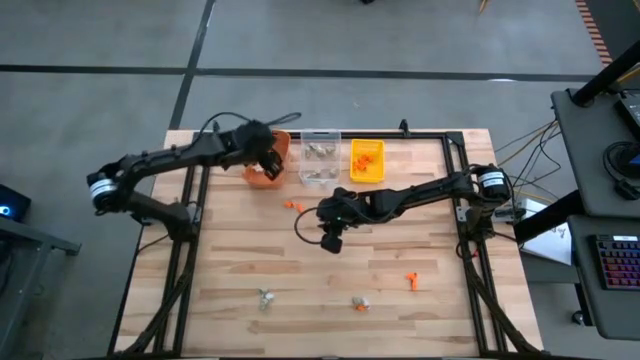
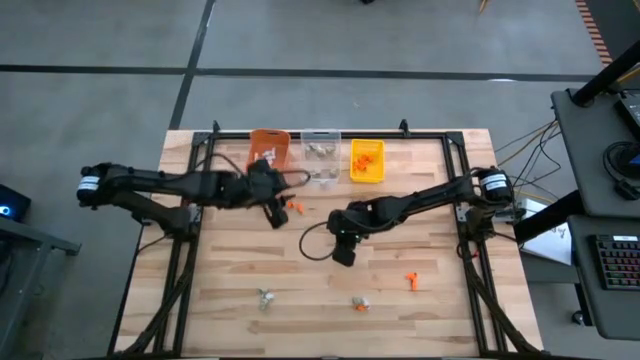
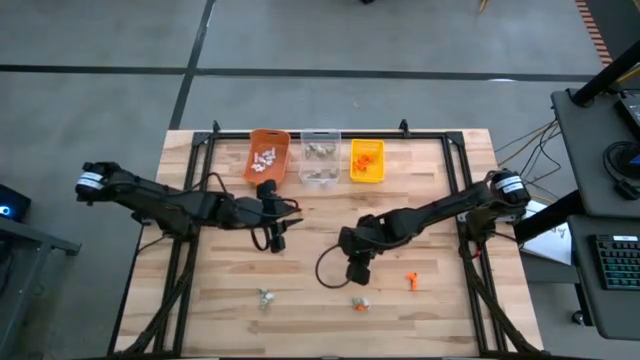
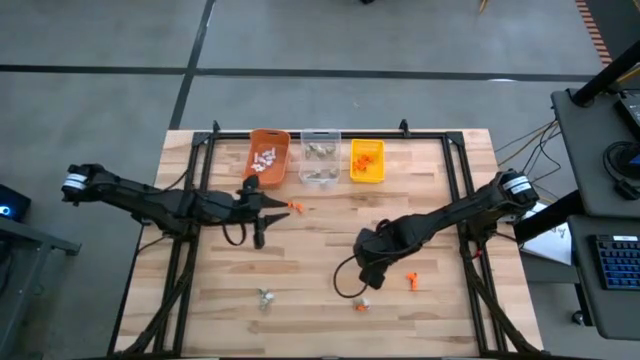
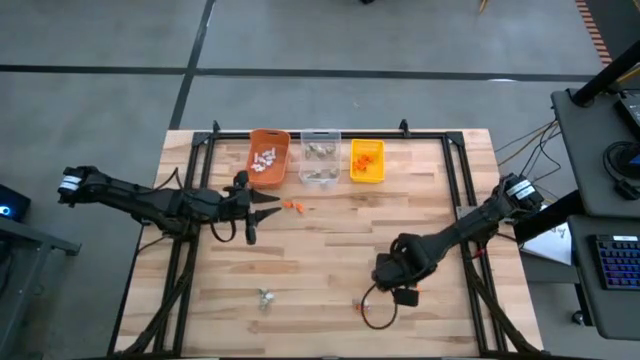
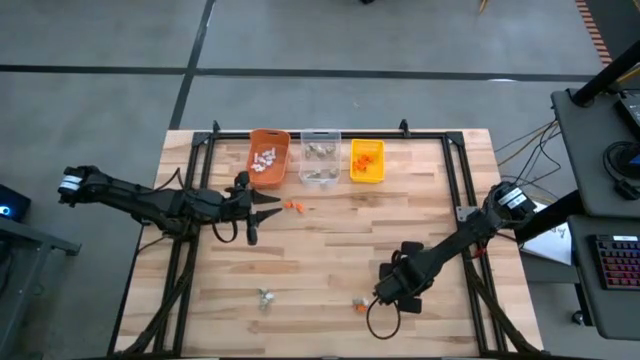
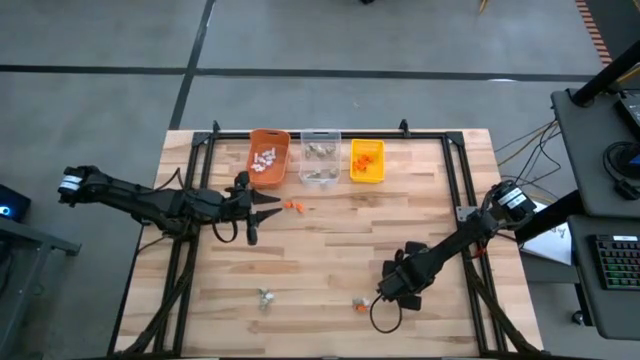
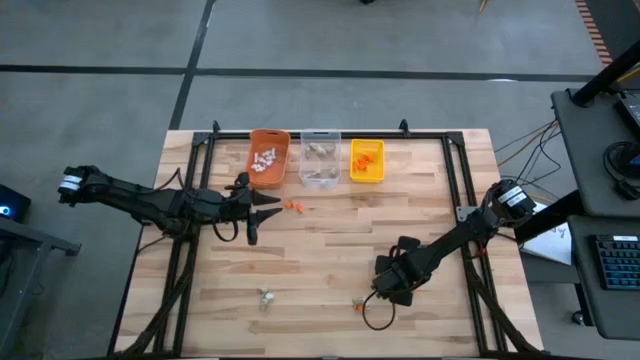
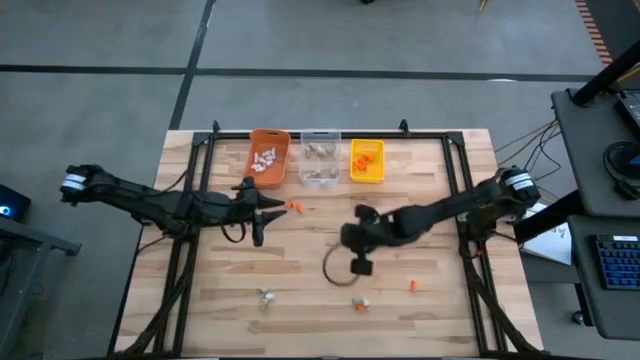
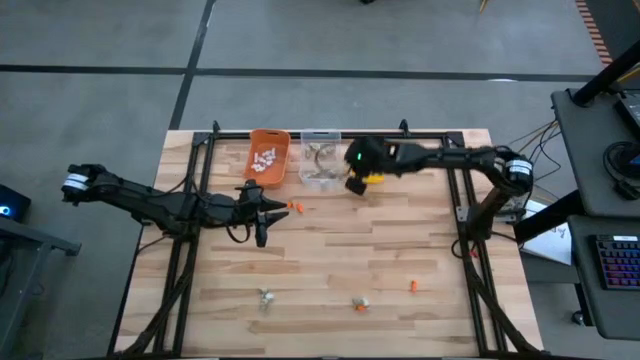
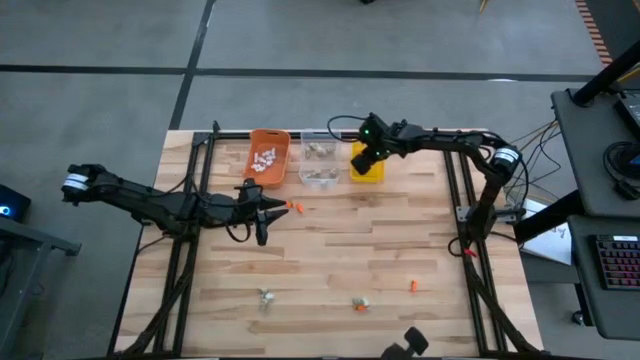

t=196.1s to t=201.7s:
Task: Sort Halloween decoration
Put the orange skeleton toy into the yellow bin

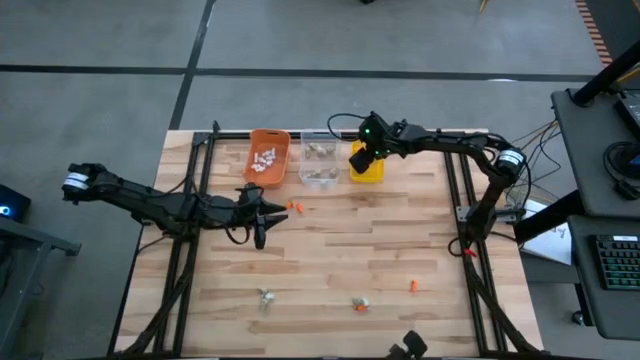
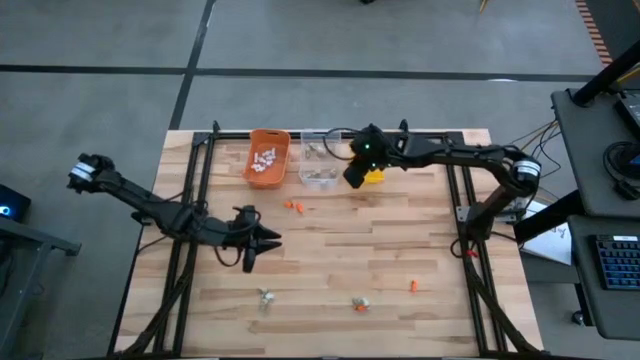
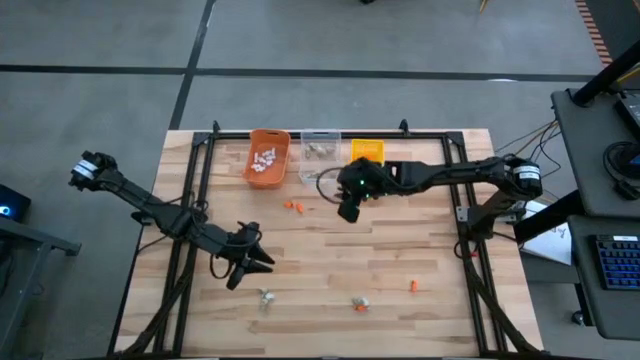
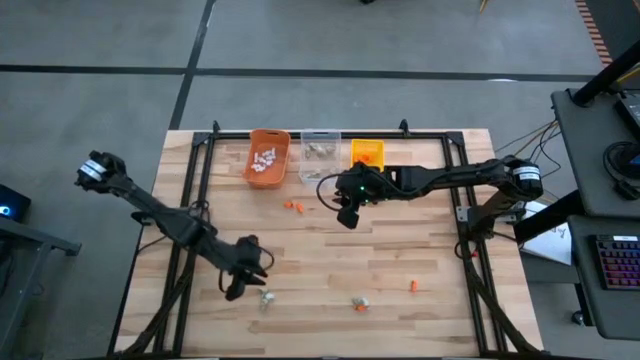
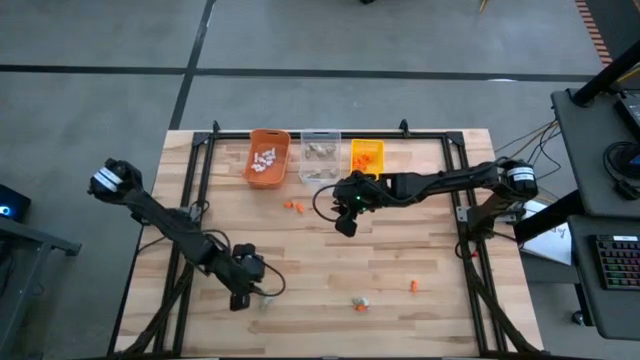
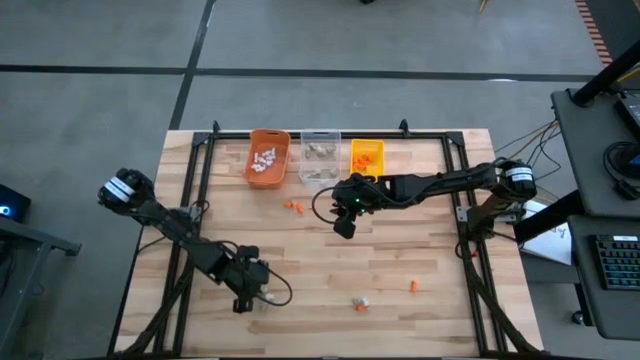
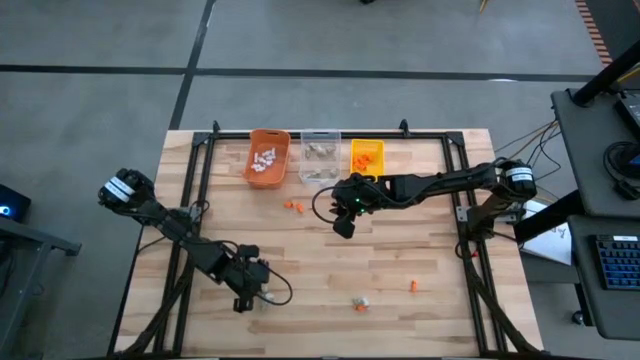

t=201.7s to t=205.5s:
Put the gray skull toy into the transparent bin

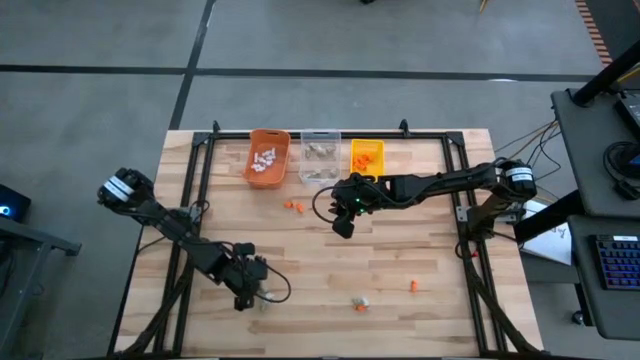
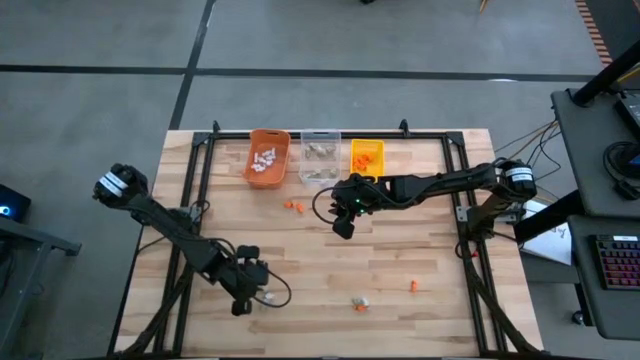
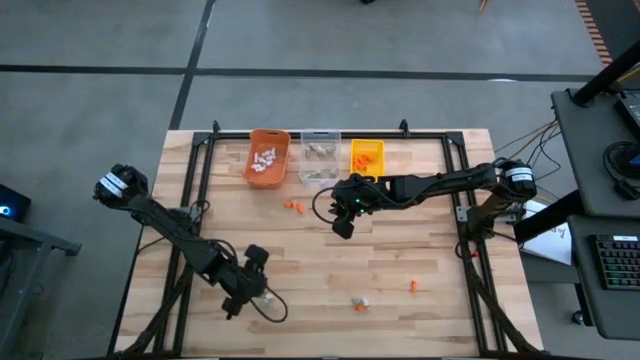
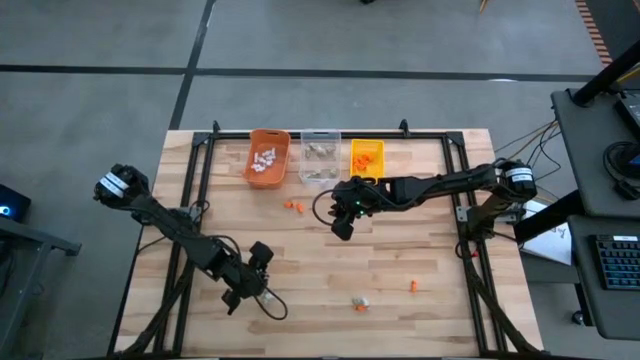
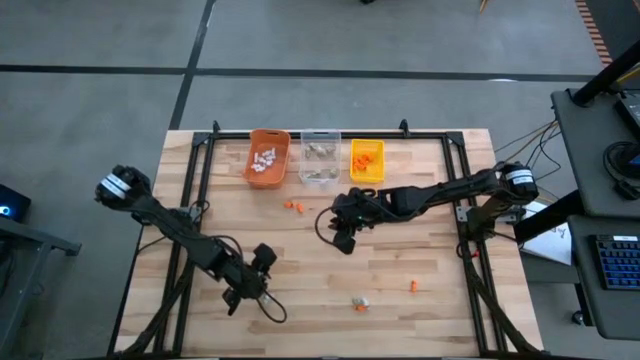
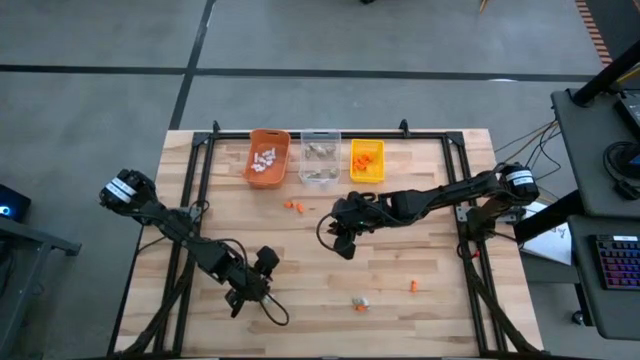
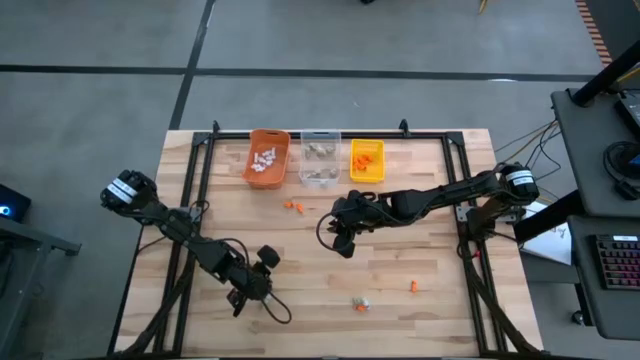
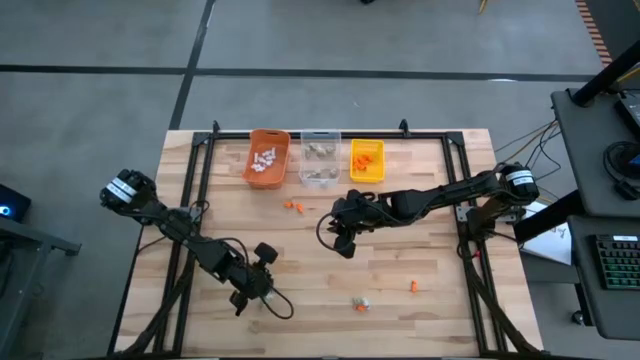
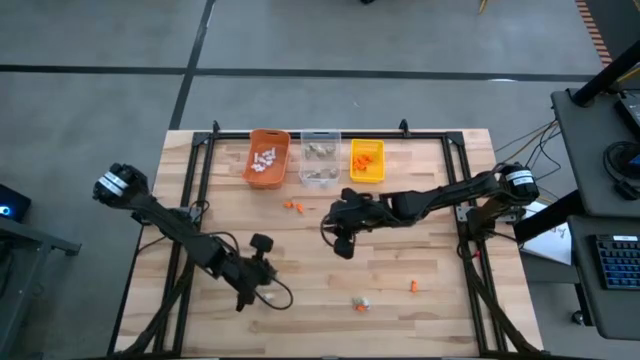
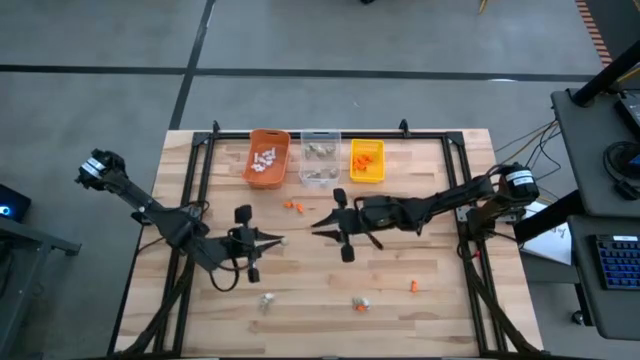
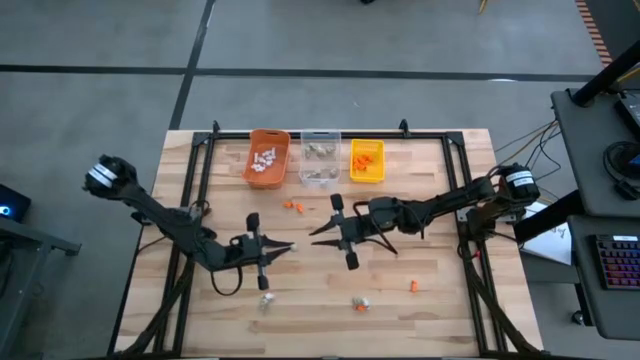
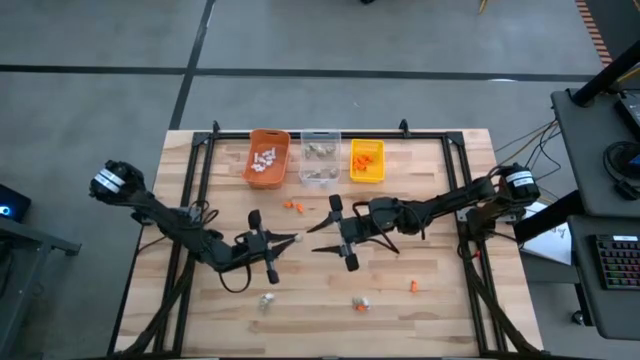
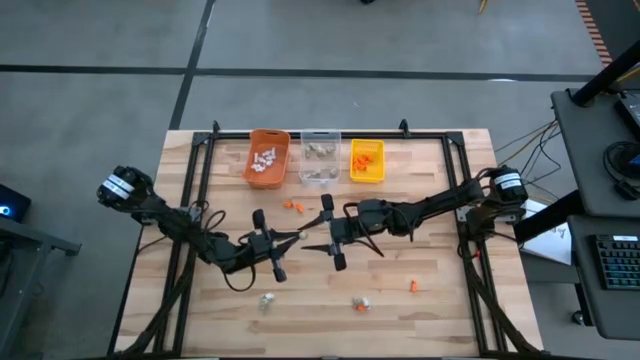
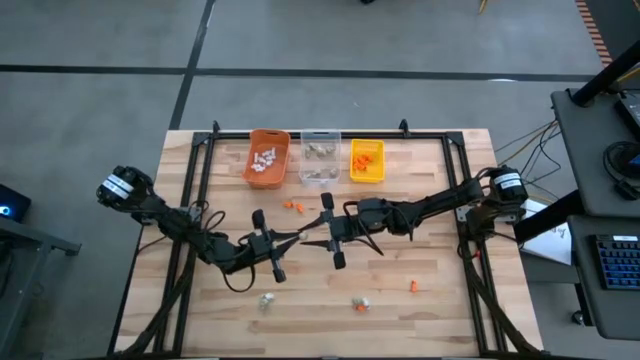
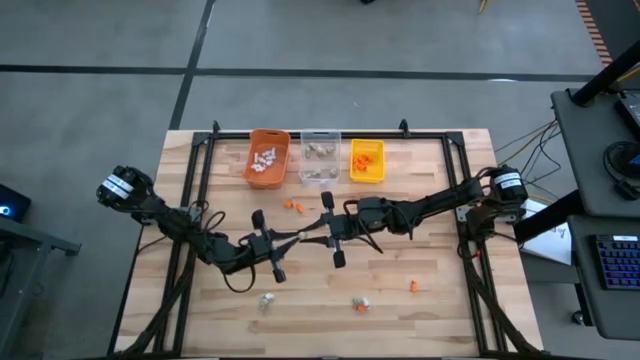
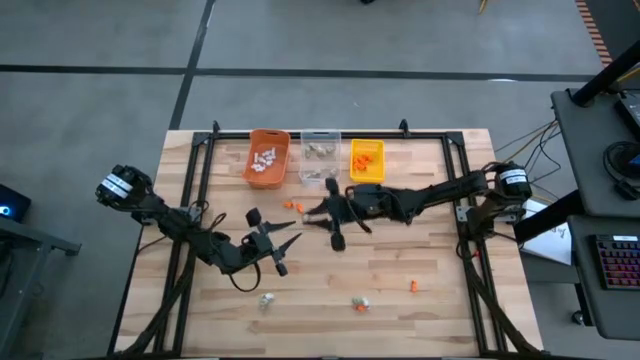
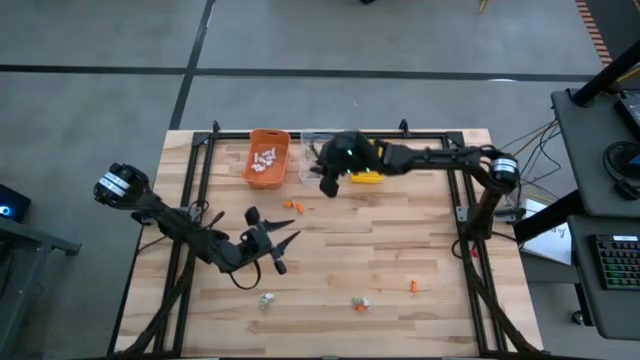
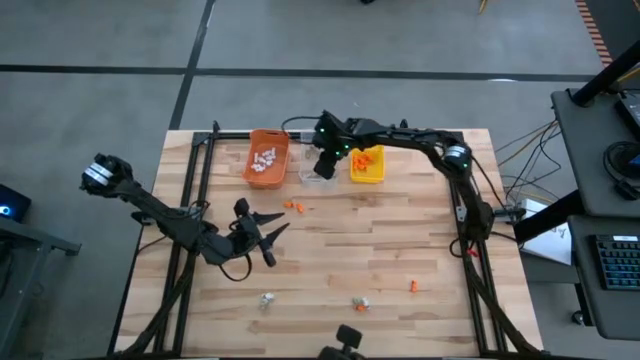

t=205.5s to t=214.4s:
Put the gray skull toy into the transparent bin

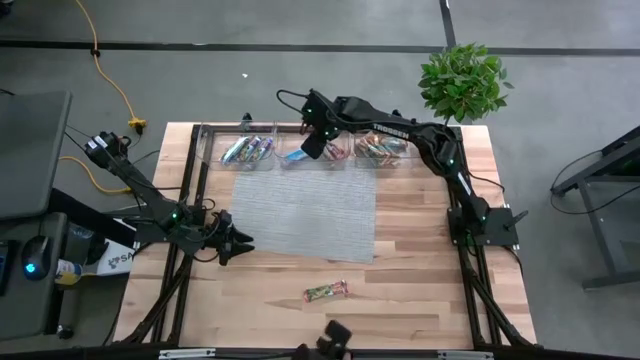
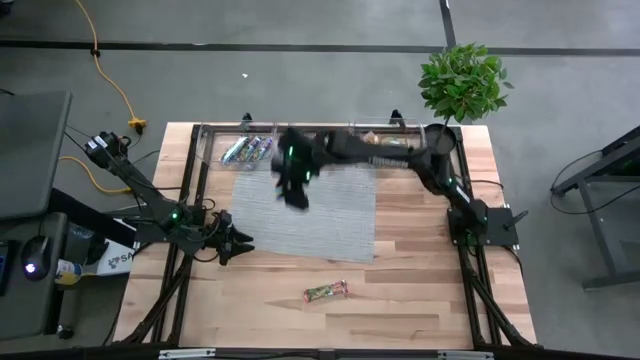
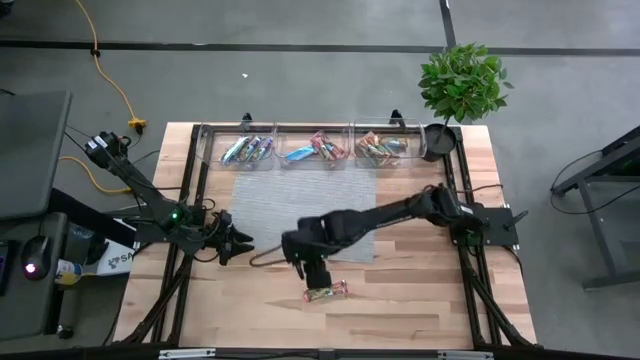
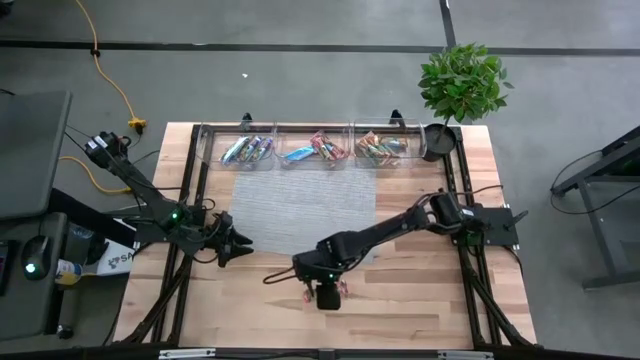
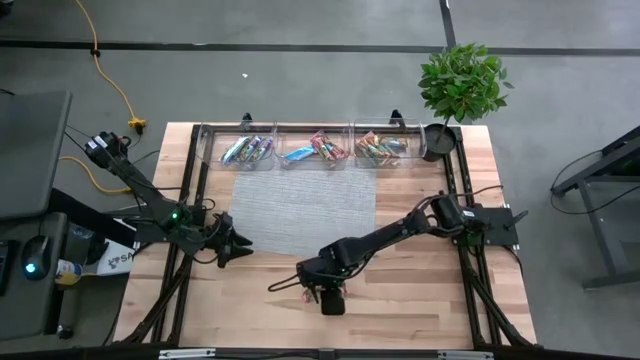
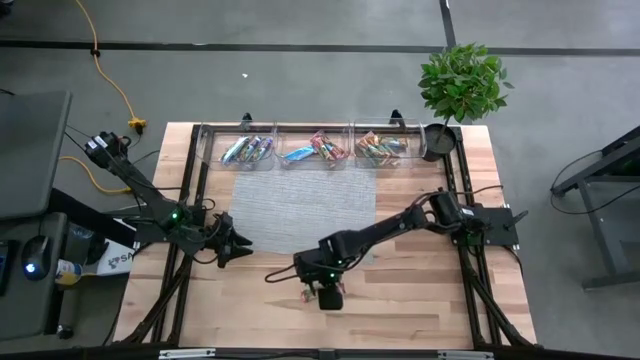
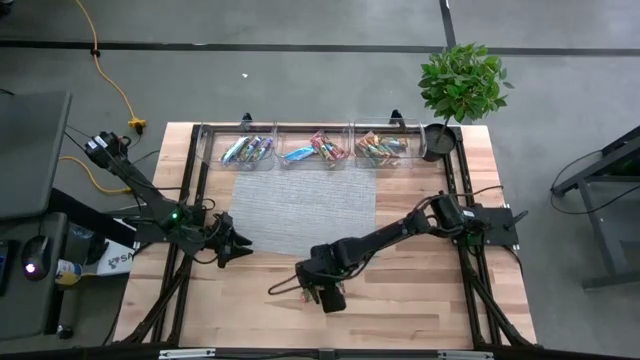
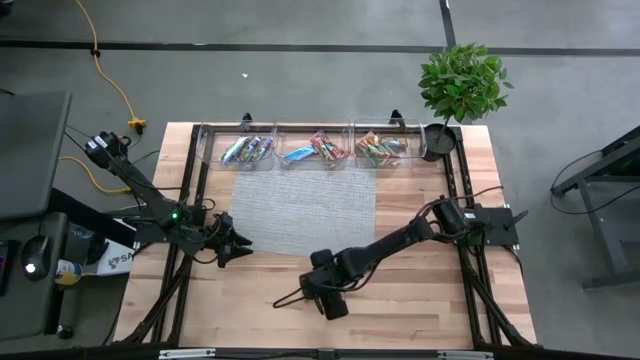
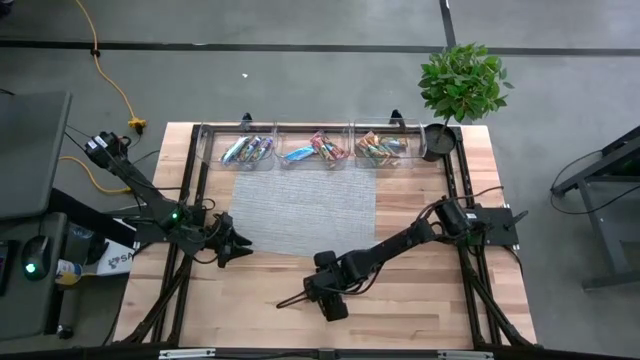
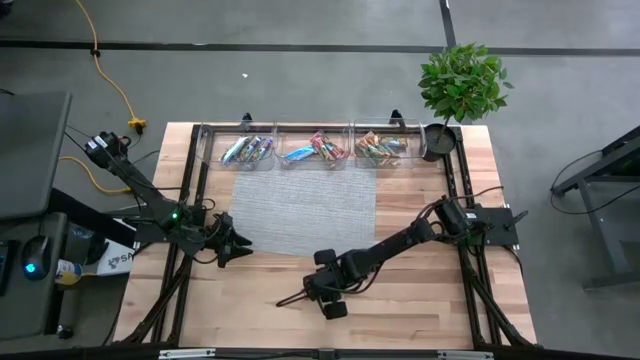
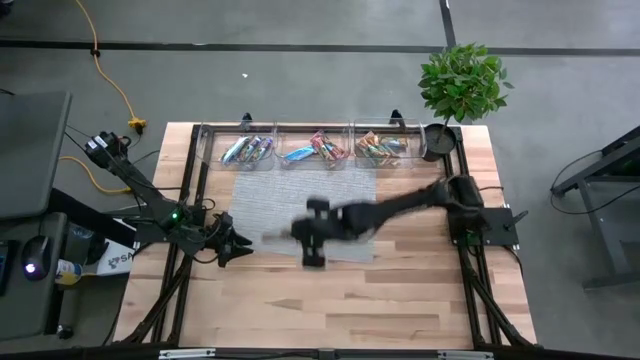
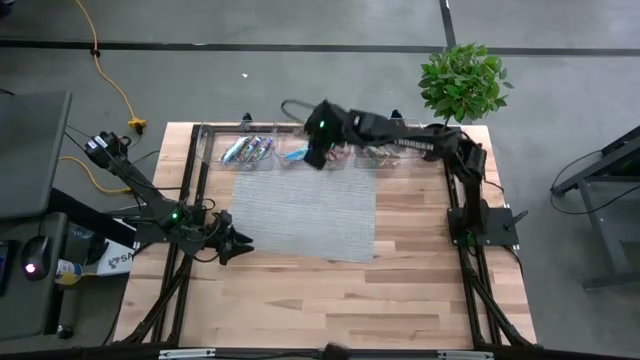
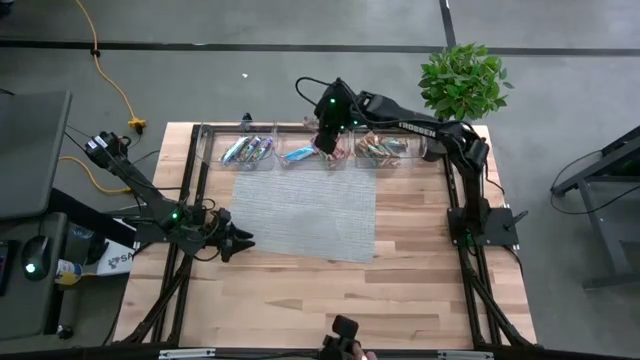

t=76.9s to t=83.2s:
Task: Pick and place Granola Bars by type
Put the red granola bar into the middle transparent bin
